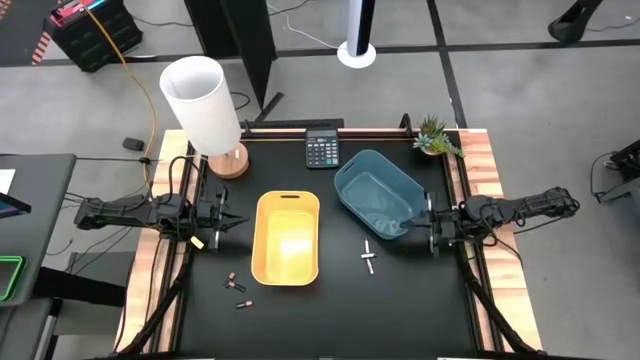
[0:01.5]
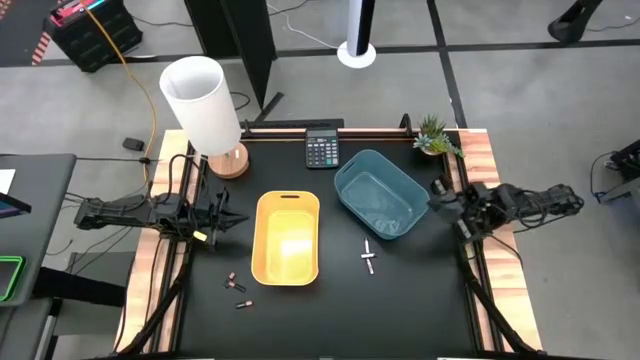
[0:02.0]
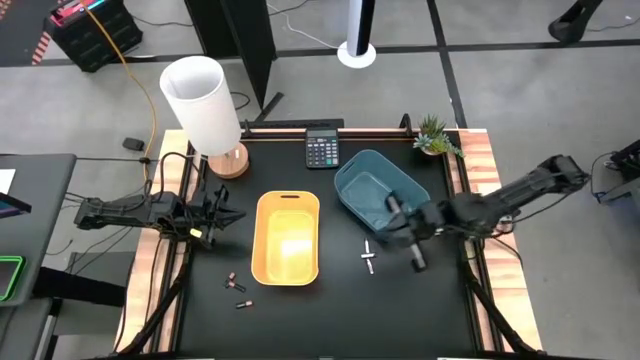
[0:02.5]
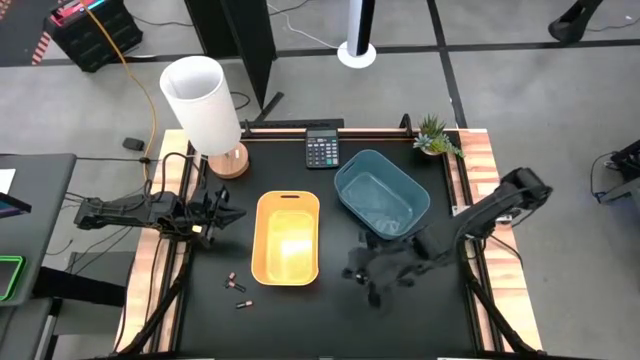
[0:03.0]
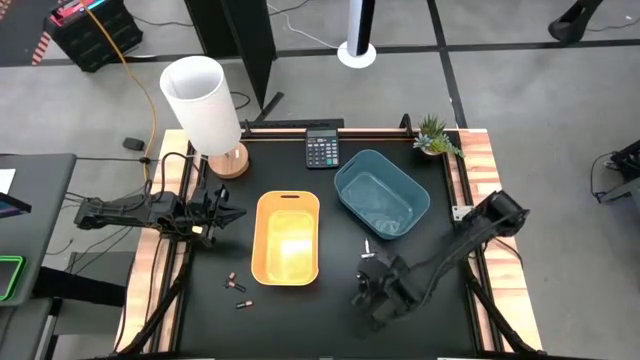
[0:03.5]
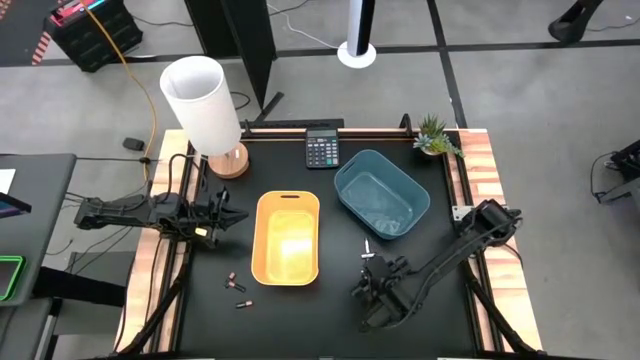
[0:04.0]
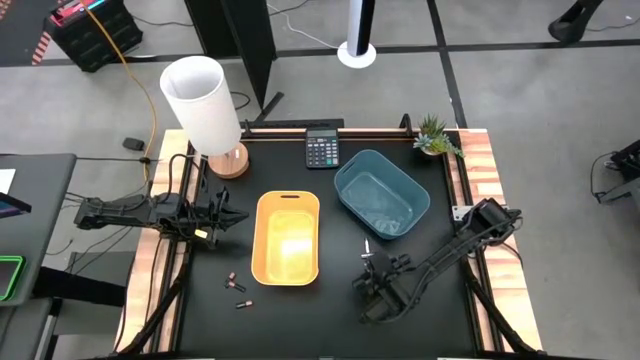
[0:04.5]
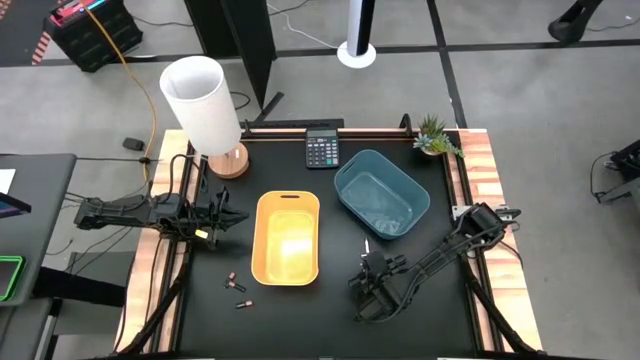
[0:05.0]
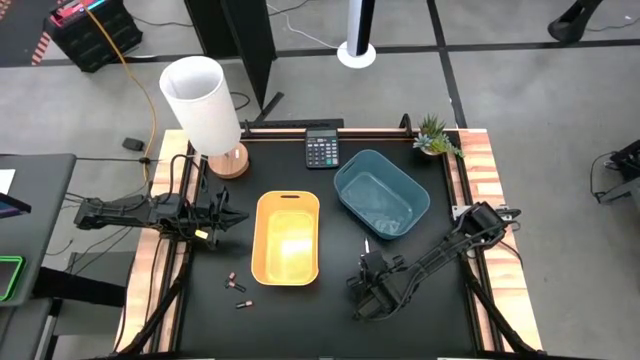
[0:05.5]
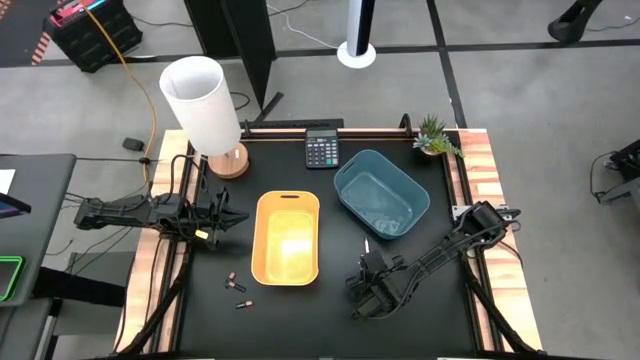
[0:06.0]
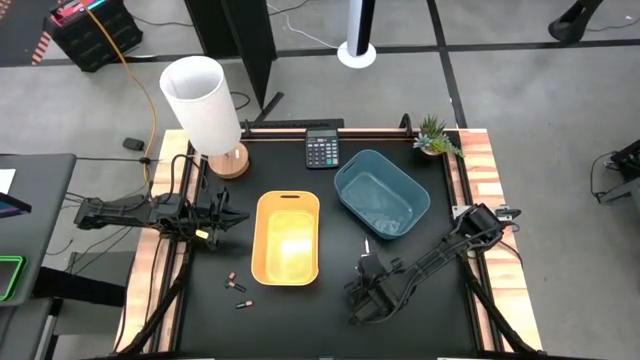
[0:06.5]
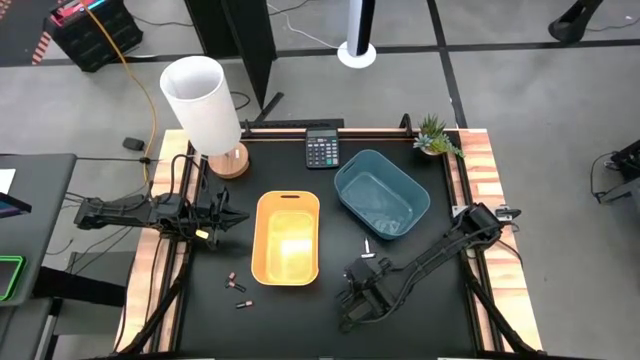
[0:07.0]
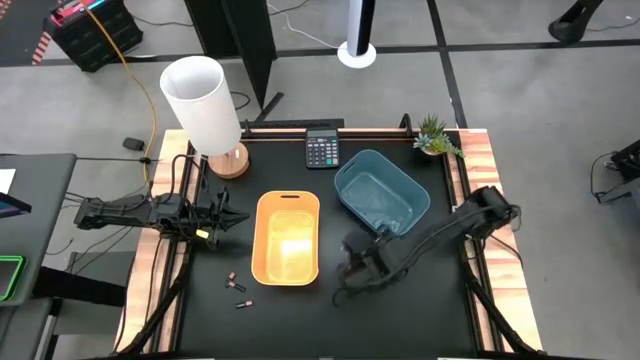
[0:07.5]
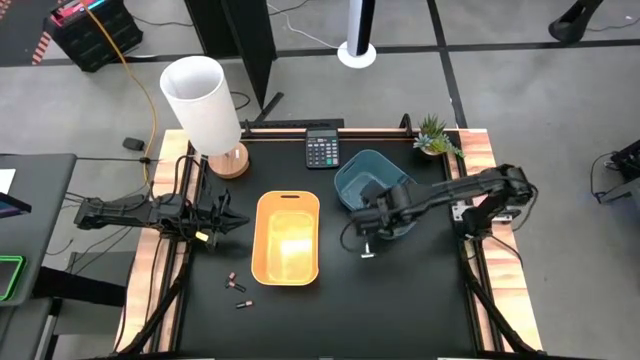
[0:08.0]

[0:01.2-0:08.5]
Task: Sort batteries
Put the bottom silver battery into the blue bin

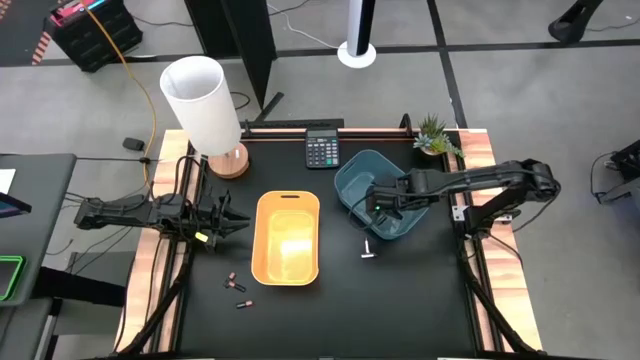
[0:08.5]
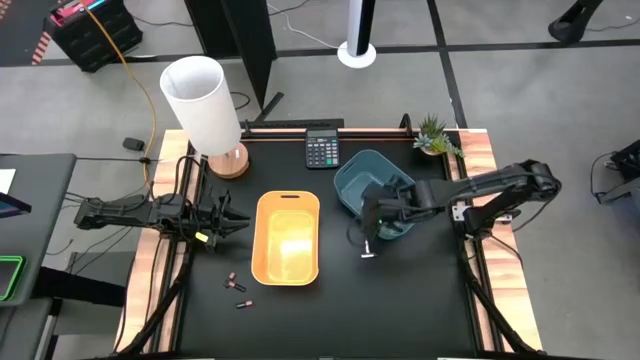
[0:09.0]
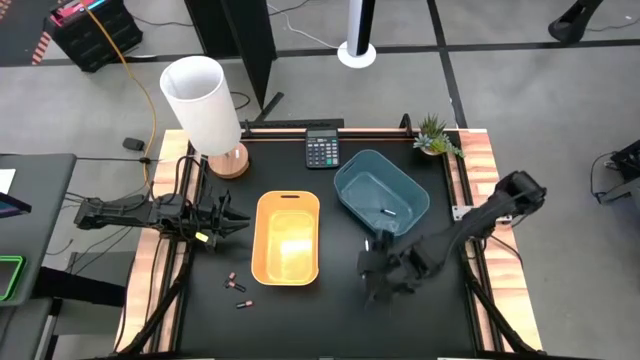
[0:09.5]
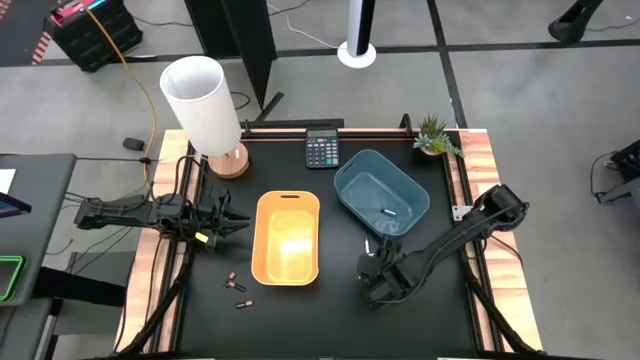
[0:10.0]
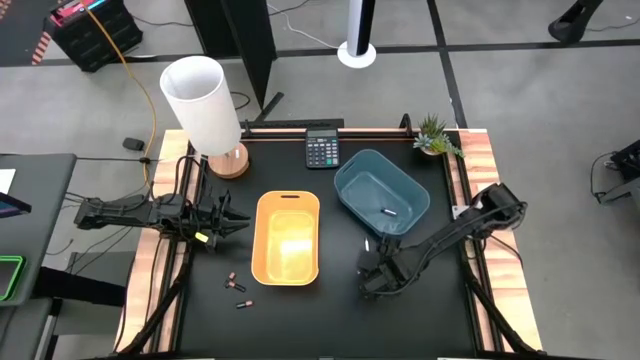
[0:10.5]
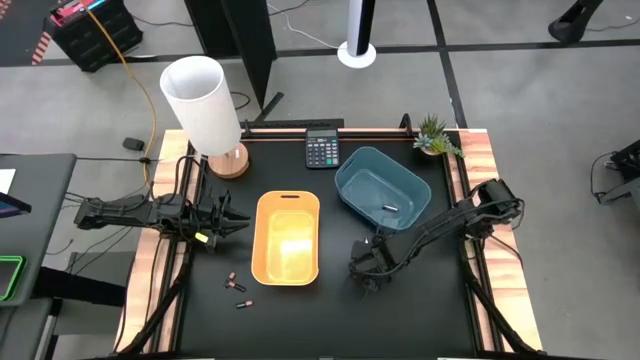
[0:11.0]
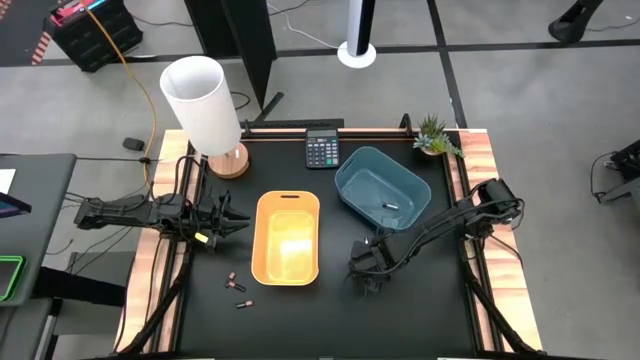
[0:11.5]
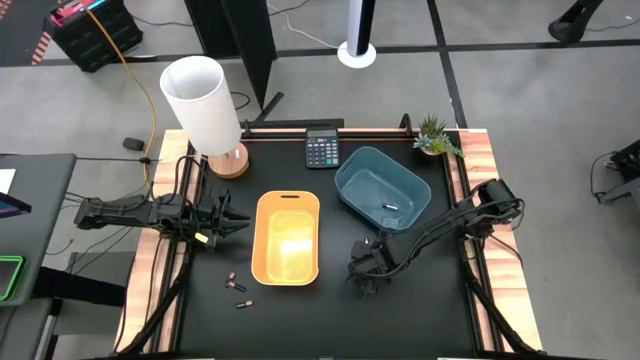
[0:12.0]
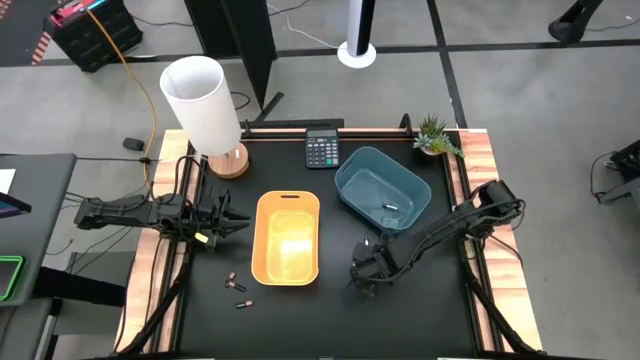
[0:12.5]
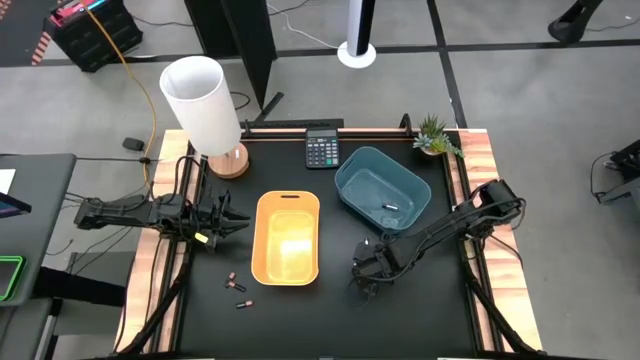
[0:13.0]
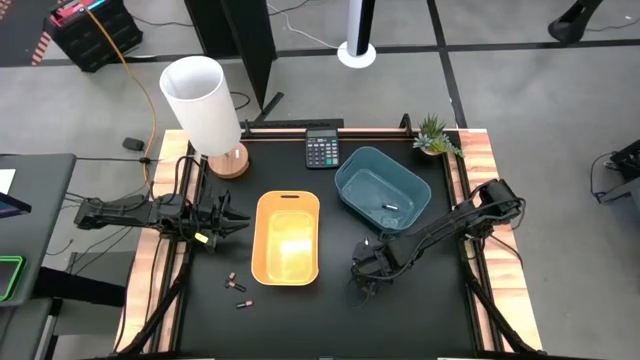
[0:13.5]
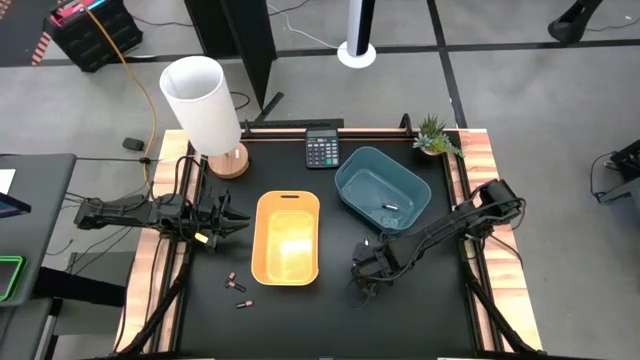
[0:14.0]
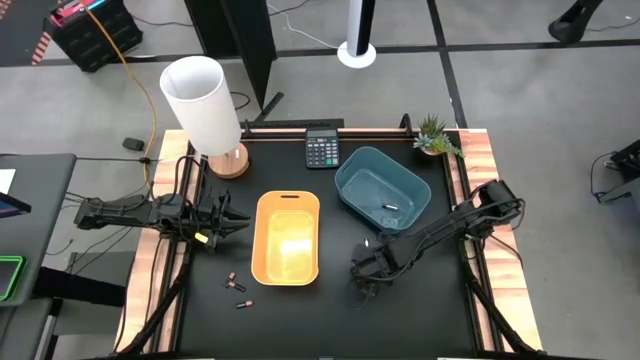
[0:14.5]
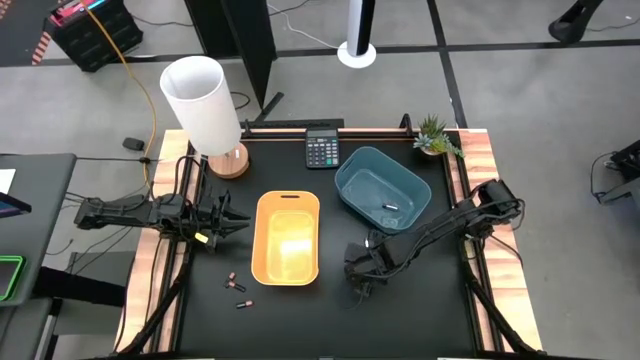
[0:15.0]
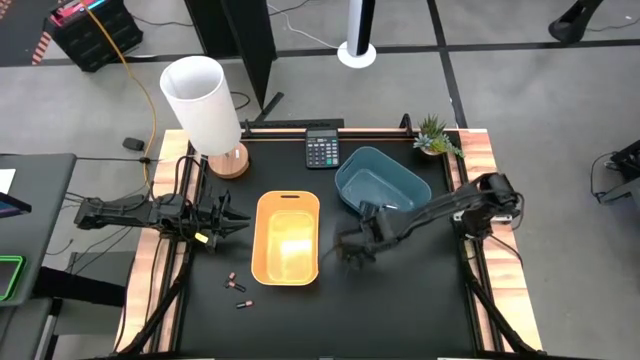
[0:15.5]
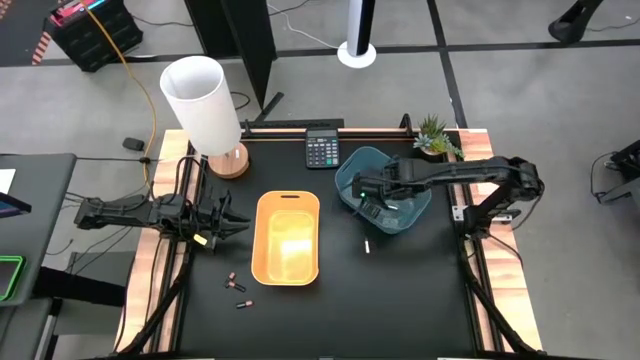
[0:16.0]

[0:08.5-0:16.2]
Put the bottom silver battery into the blue bin

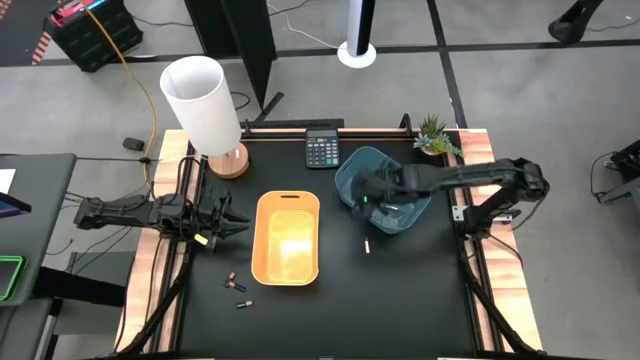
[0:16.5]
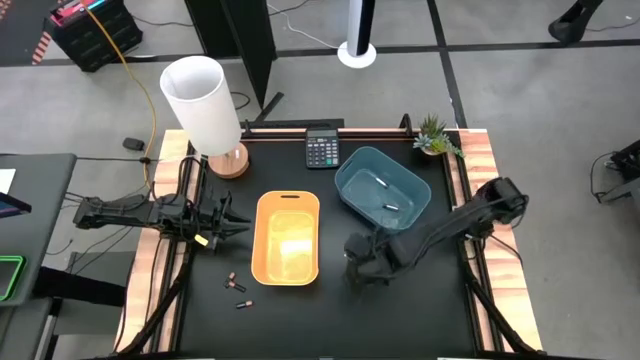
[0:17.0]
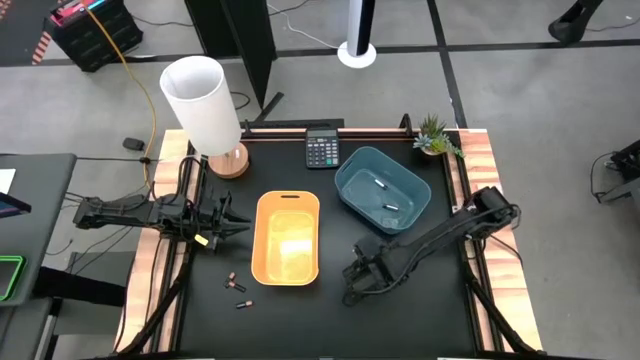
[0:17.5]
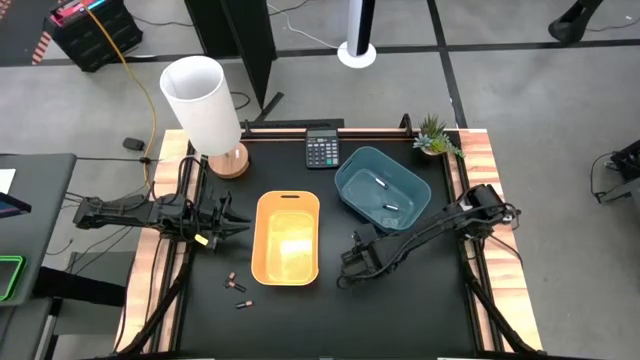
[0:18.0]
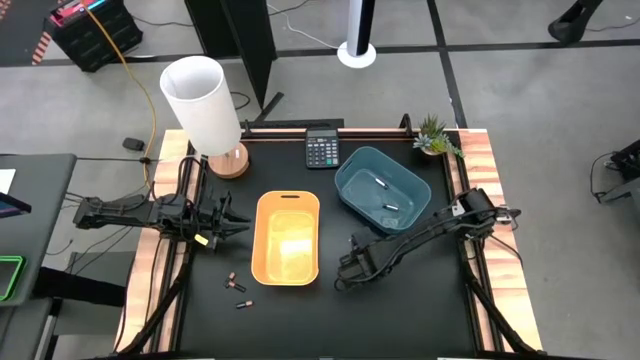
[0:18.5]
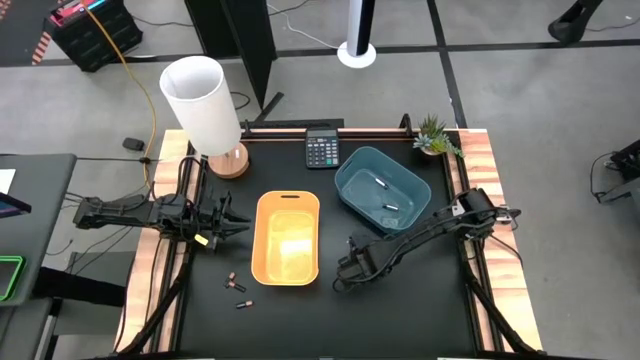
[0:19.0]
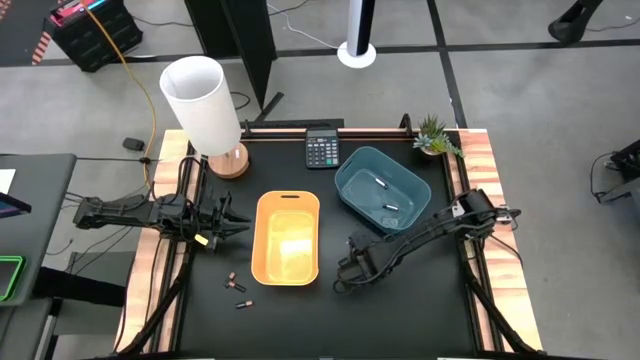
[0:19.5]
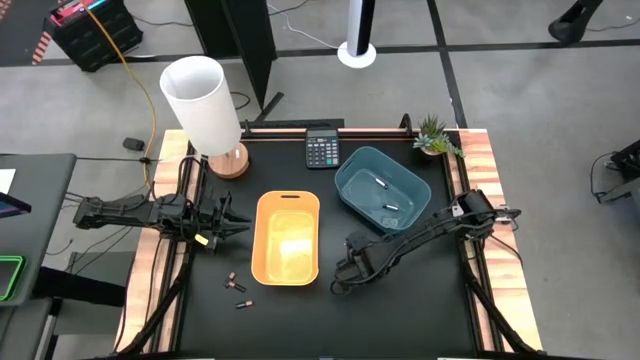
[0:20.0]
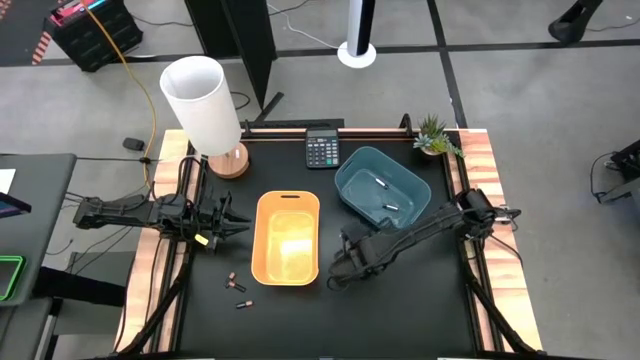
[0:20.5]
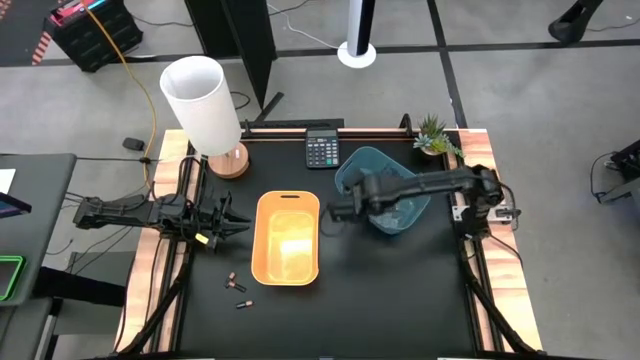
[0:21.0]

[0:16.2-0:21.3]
Put the silver battery into the blue bin

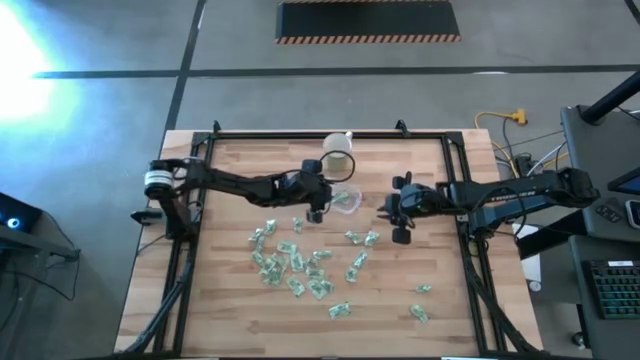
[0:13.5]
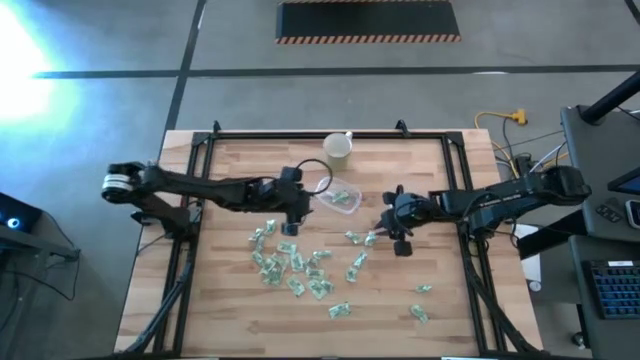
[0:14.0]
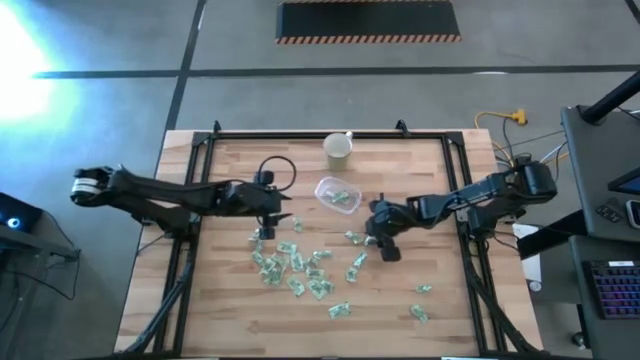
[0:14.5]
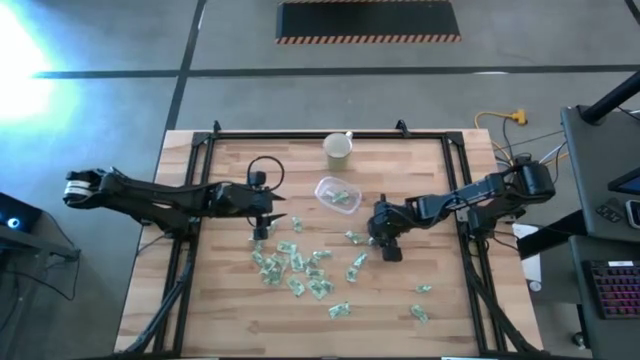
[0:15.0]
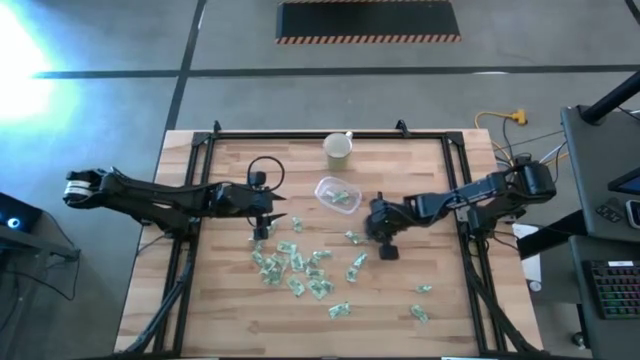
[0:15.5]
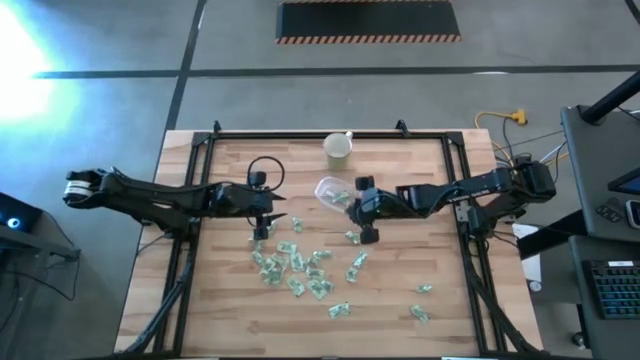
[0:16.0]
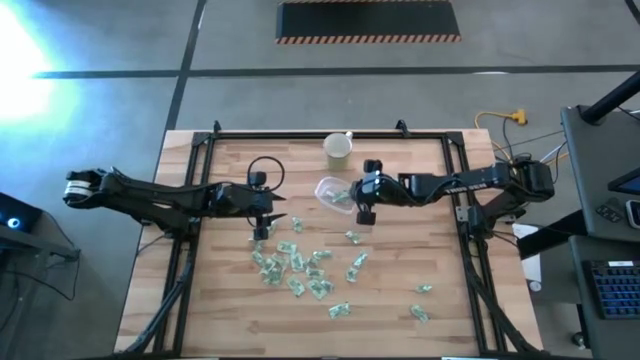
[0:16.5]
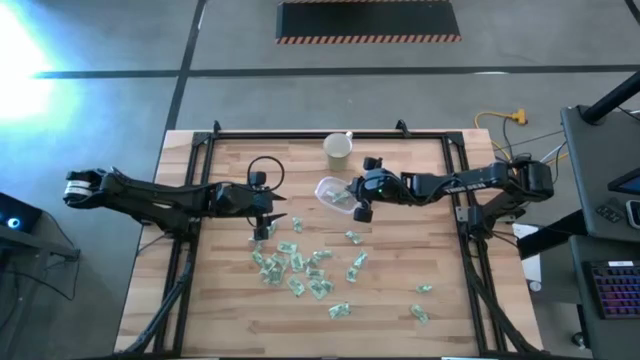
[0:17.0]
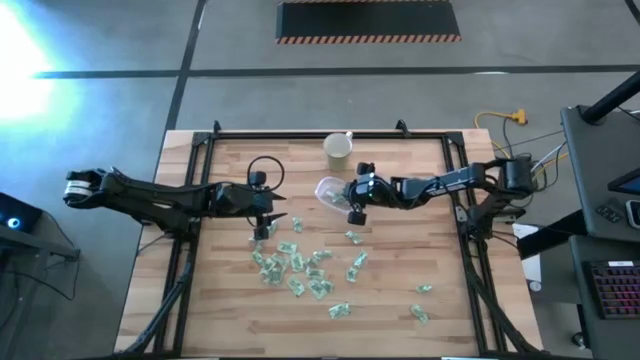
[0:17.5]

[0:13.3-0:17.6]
Task: Pick and place items into bin
Put the green stevia packet into the transparent bin
